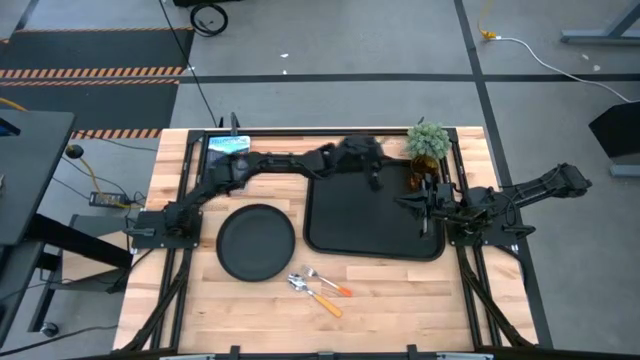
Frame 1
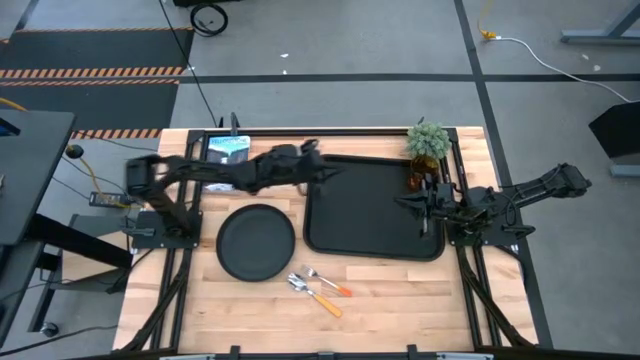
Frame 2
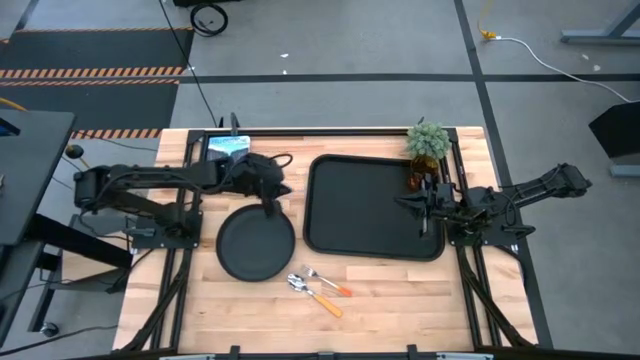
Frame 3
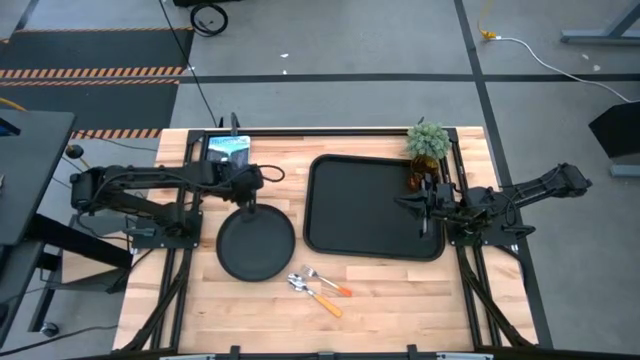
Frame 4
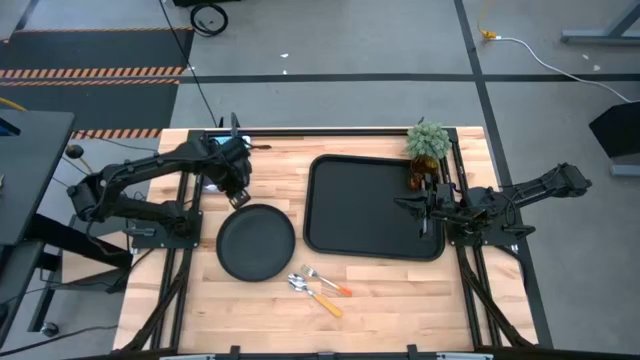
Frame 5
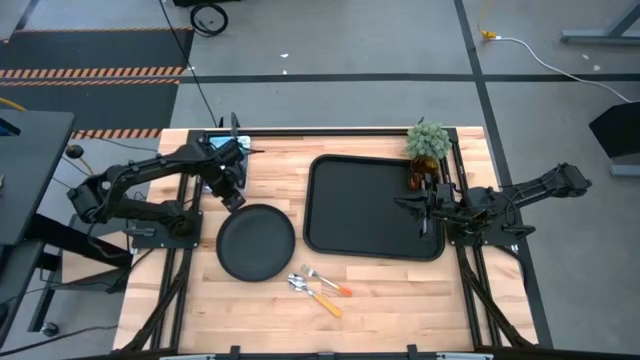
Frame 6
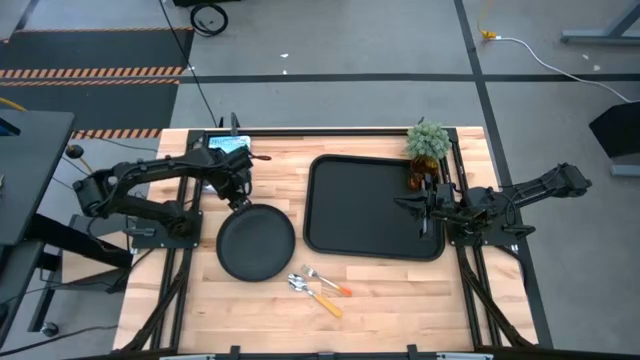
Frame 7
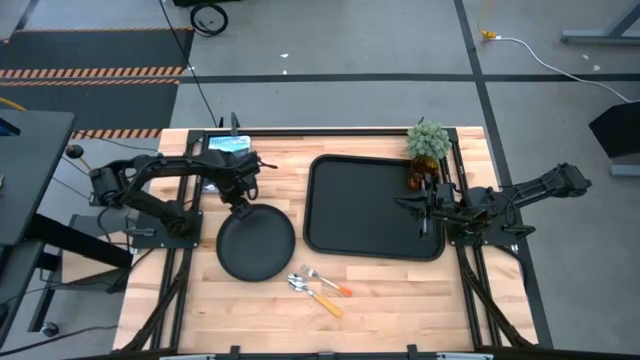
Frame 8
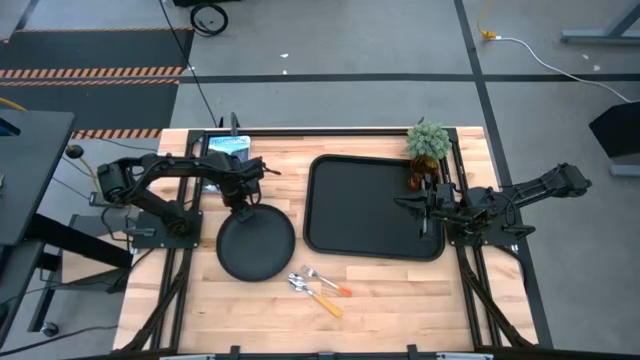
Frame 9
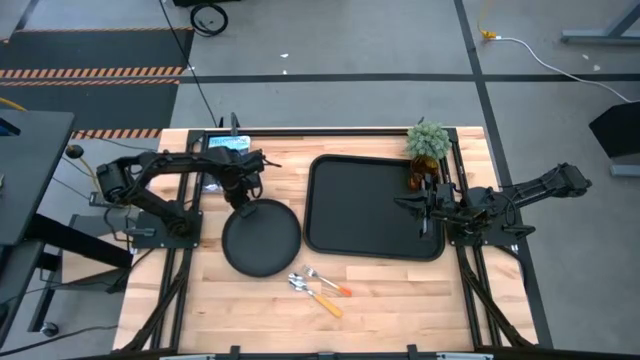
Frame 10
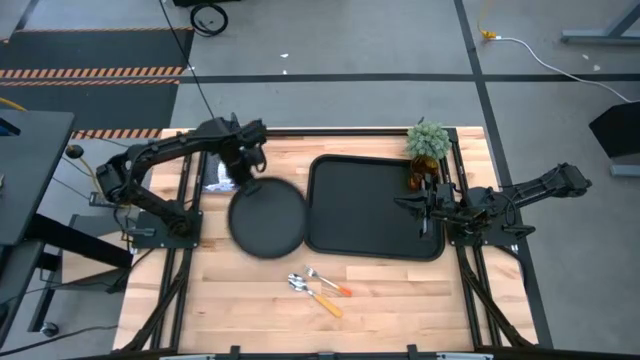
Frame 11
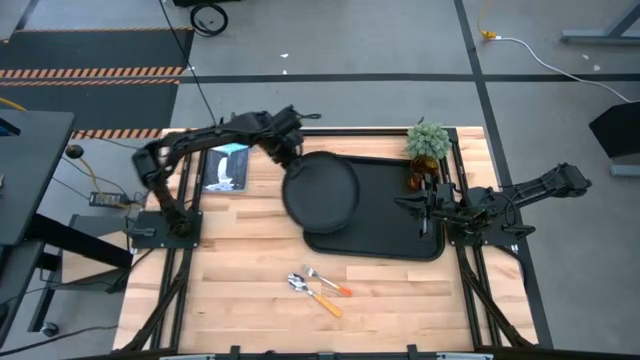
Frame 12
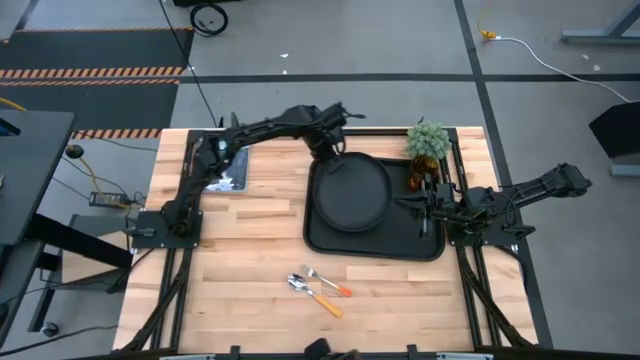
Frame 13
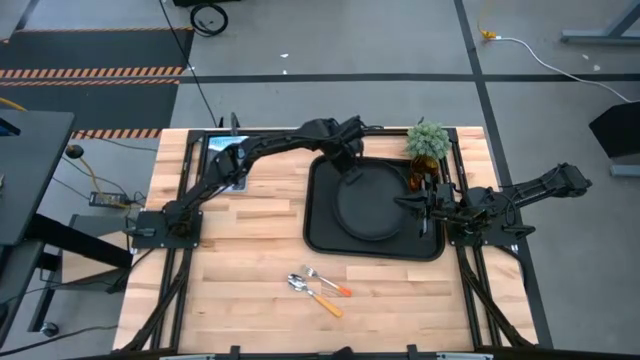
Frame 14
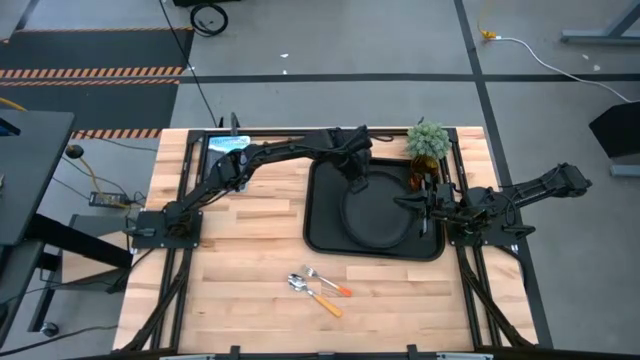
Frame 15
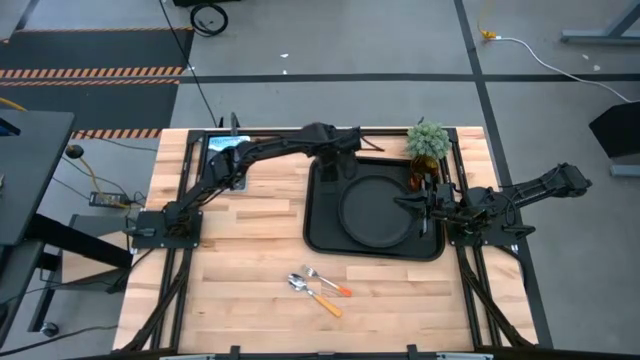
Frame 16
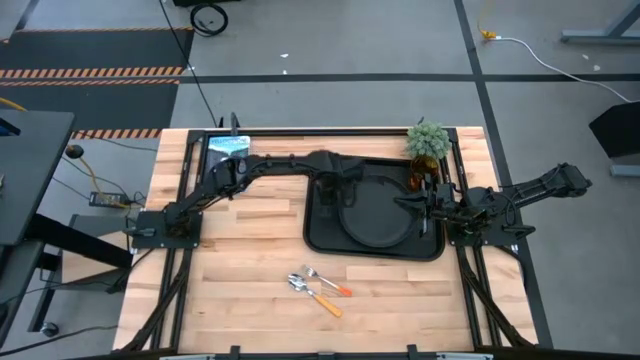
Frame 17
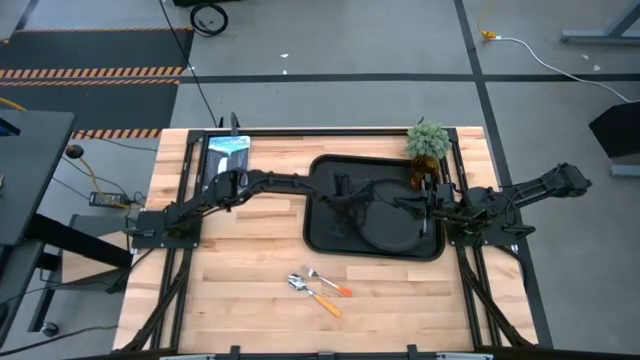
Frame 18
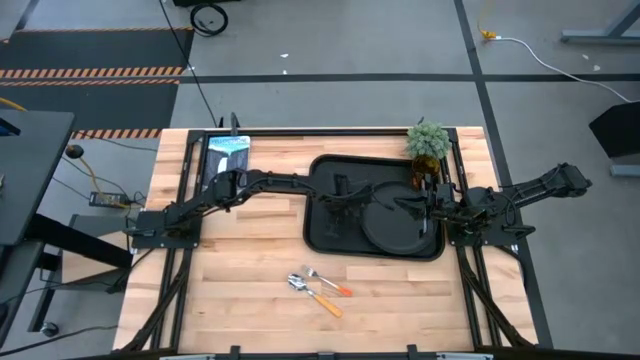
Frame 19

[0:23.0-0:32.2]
Task: Pick and place plate/cup/fork/spoon on tray
Put the black plate on the black serving tray to the bottom left of the brown cup

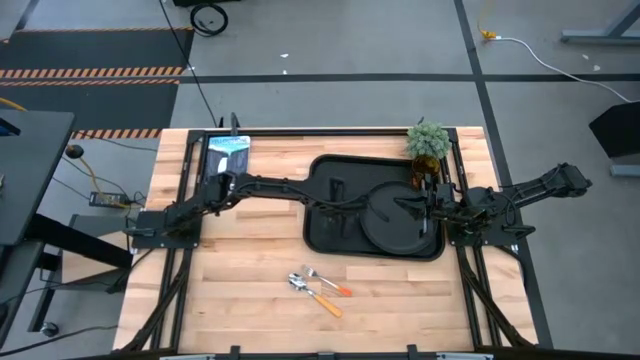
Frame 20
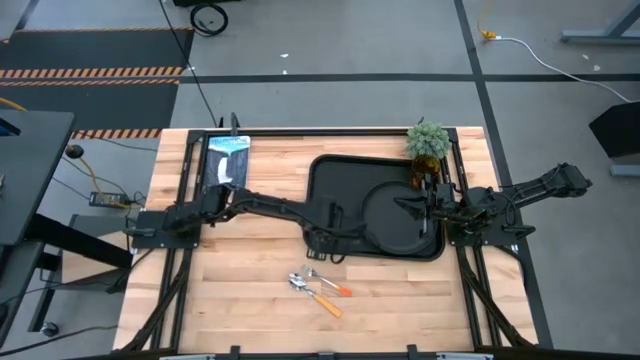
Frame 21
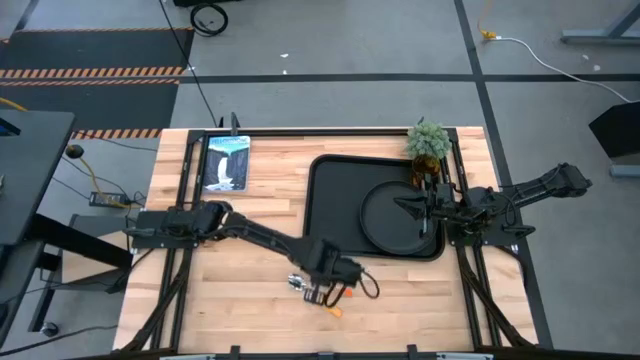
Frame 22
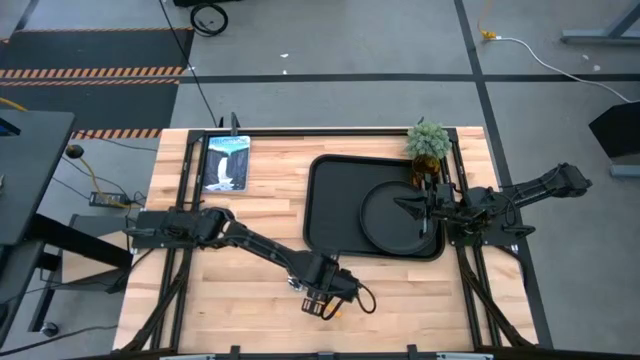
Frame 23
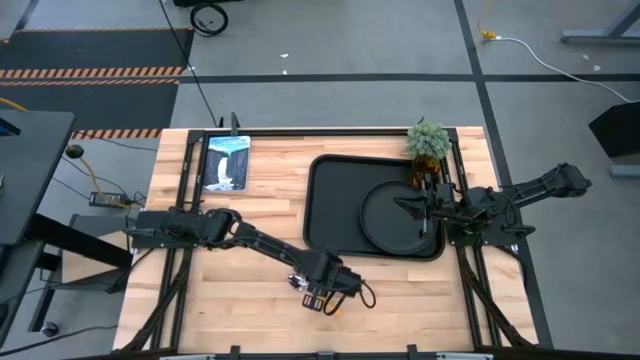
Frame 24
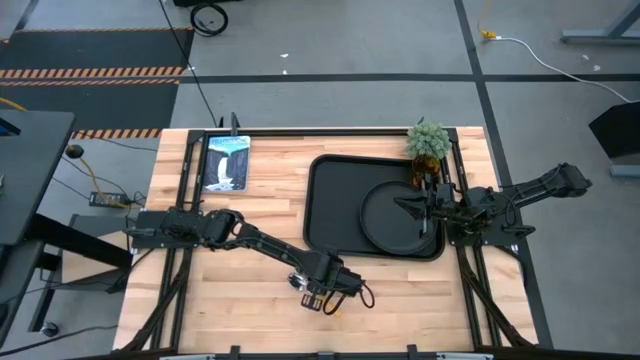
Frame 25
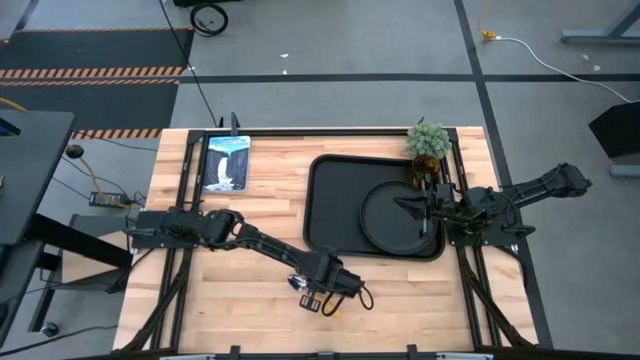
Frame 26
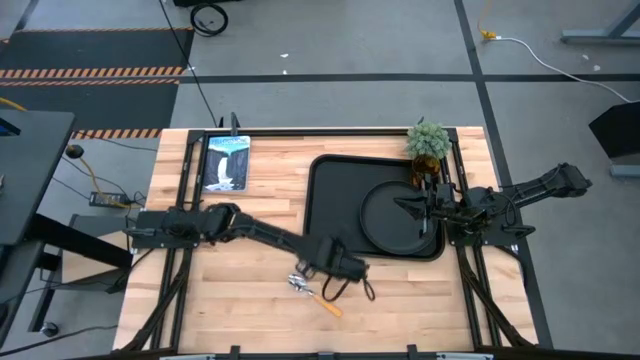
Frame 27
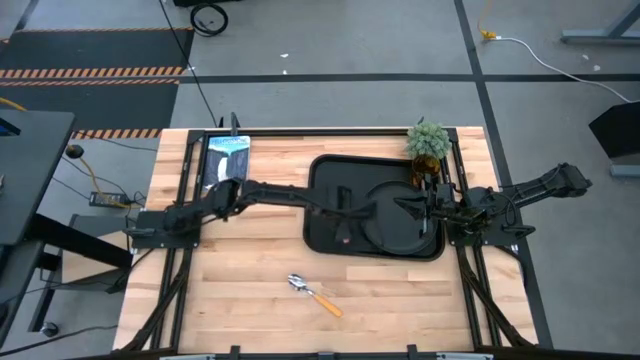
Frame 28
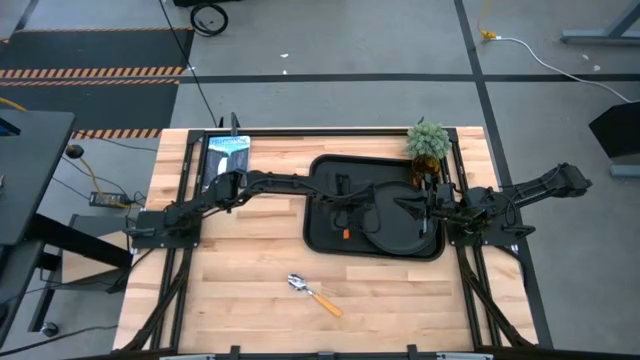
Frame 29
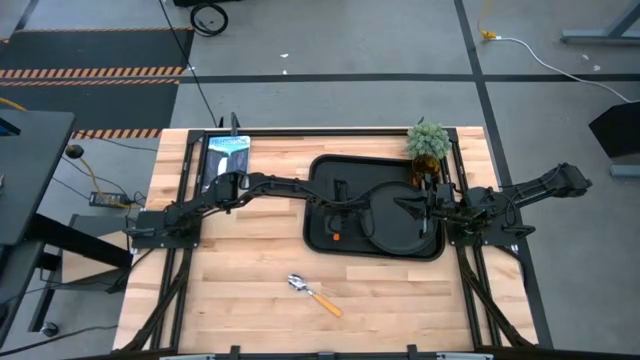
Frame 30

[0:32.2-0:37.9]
Put the orange fork on the black serving tray to the left of the black plate

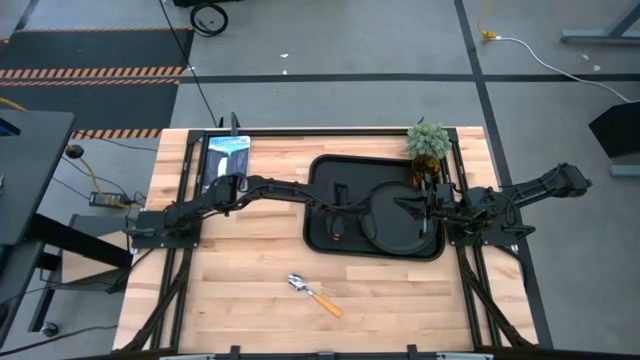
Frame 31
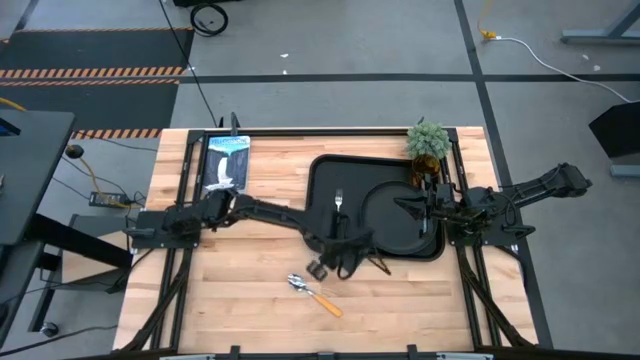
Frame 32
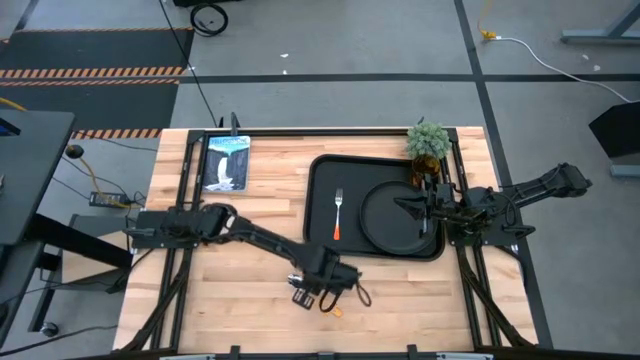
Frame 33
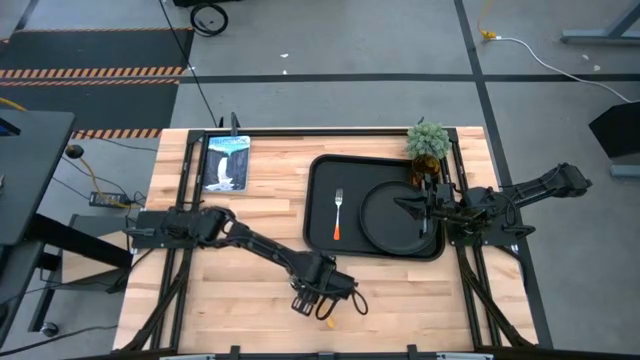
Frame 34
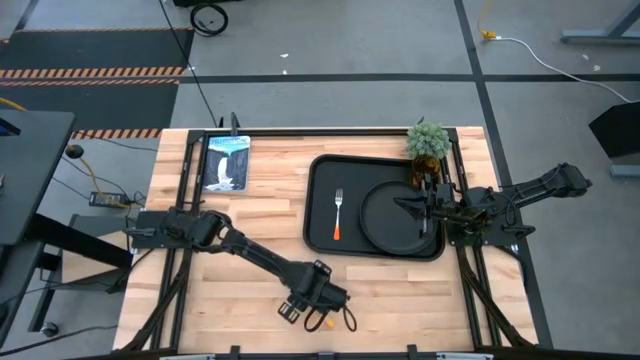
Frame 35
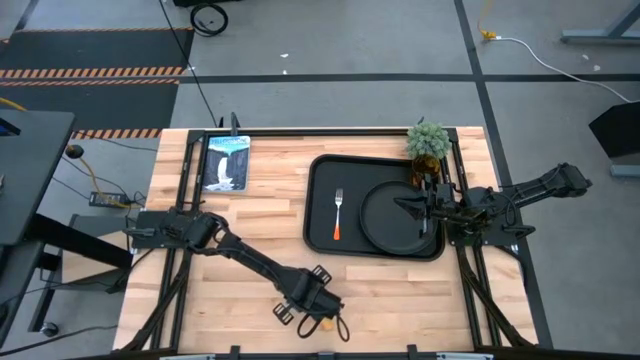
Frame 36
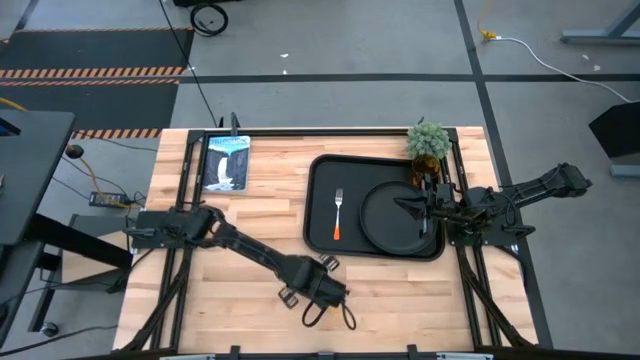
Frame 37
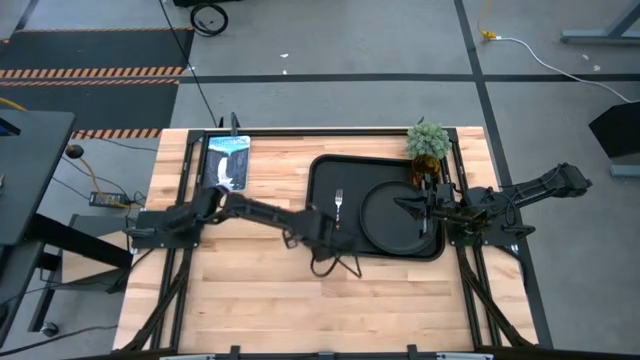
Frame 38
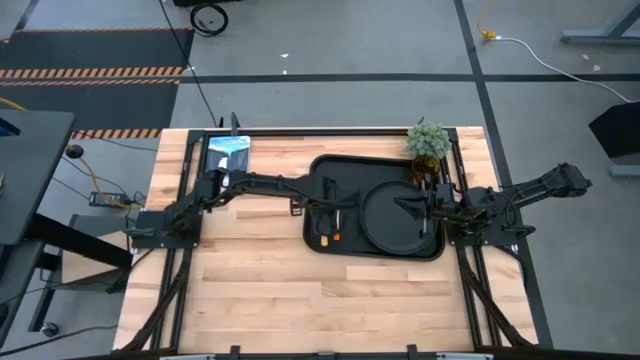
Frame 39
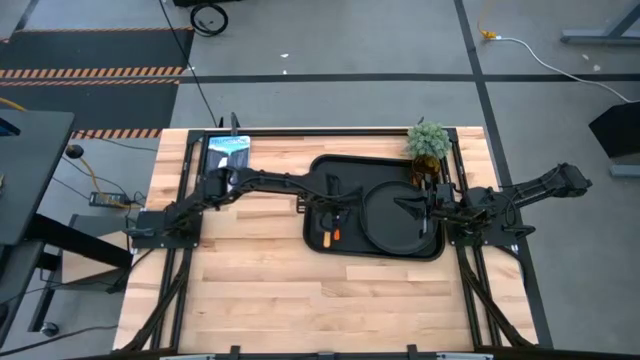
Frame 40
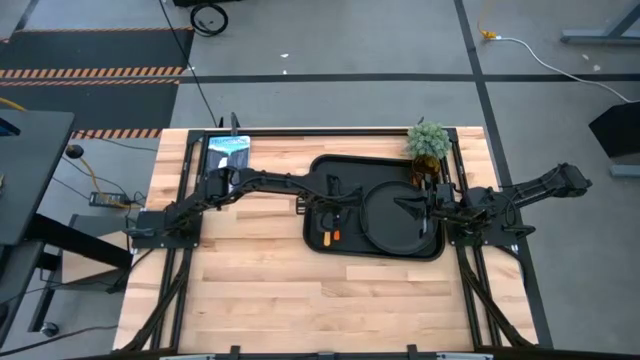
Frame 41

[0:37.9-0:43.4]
Put the yellow spoon on the black serving tray to the left of the orange spoon
